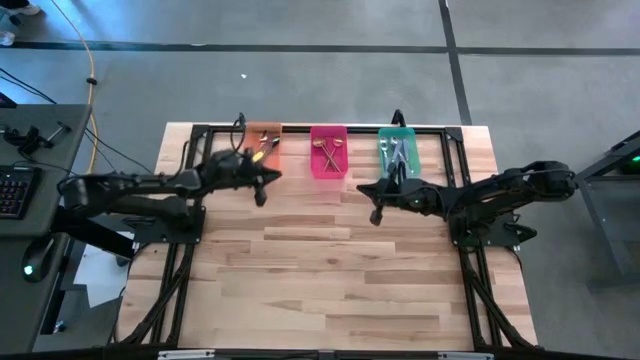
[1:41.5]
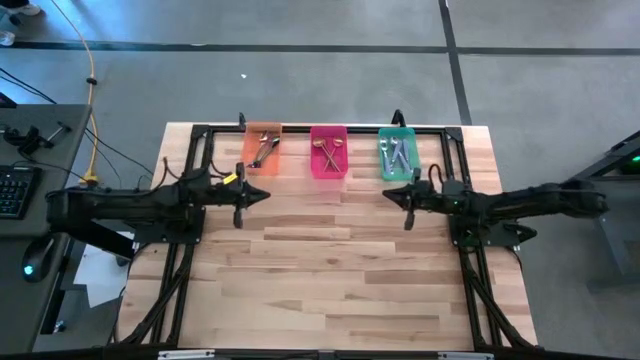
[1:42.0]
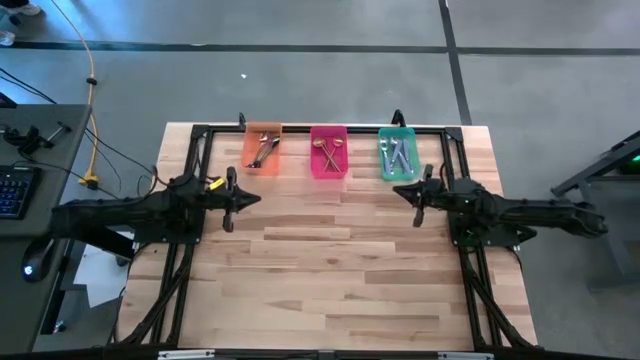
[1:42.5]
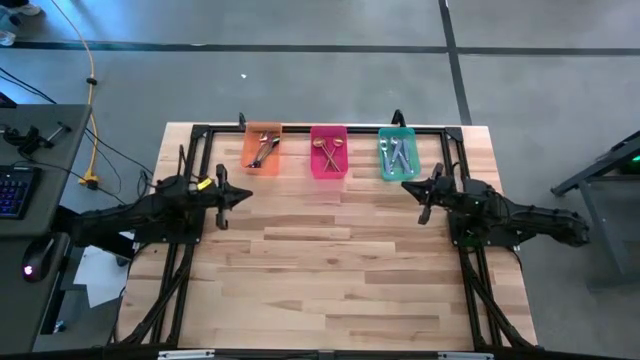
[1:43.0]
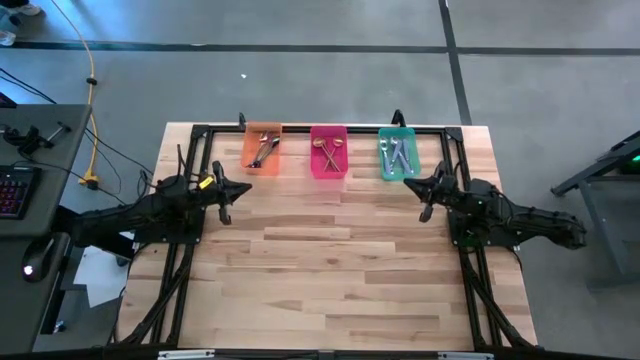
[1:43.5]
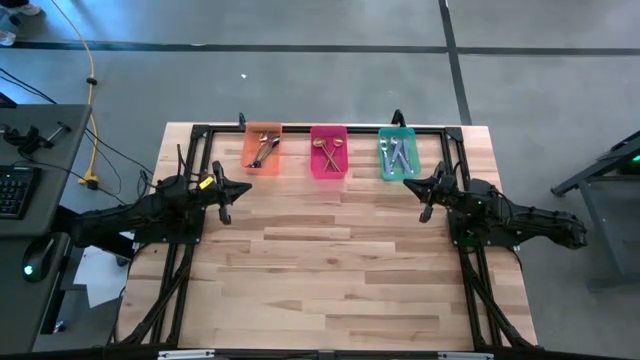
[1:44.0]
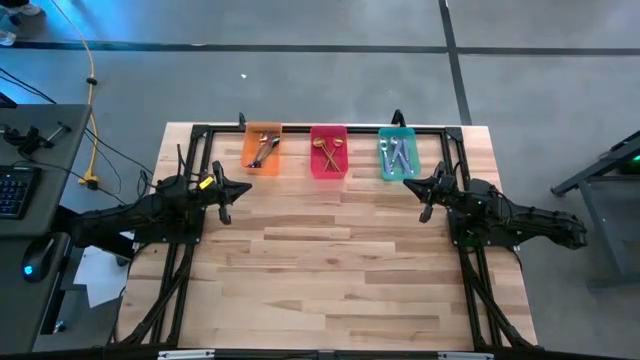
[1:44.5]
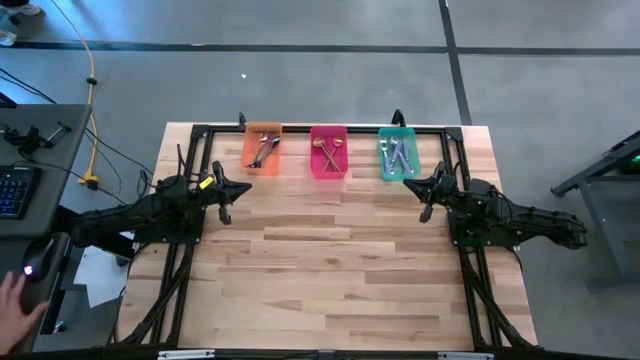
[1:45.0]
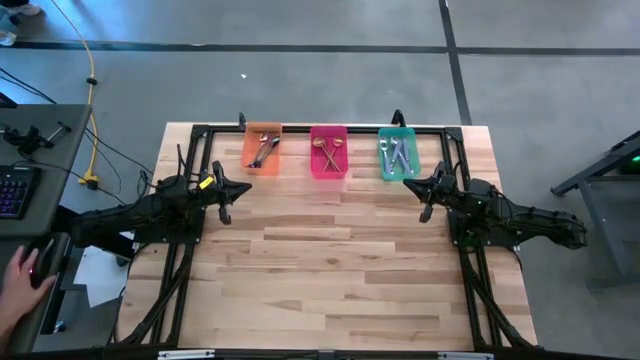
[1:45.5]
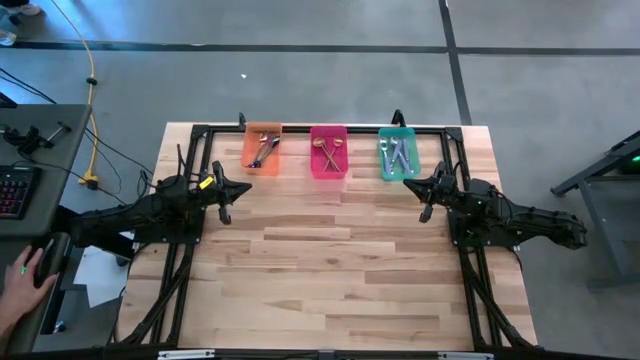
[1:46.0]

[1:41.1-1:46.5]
Task: Sort silverware by color (type)
Return to Home Position

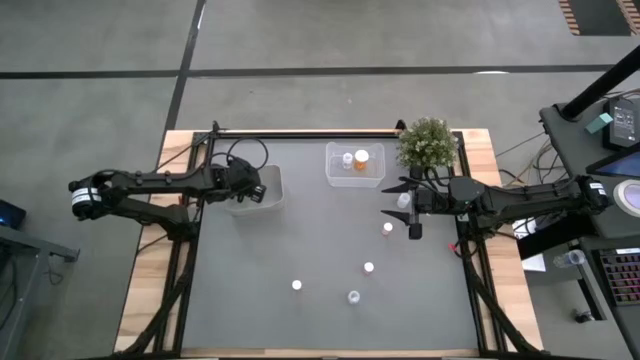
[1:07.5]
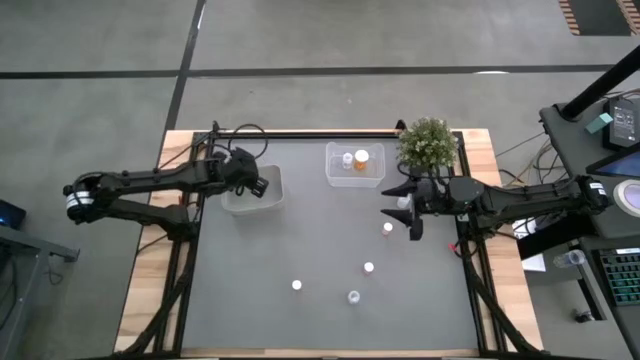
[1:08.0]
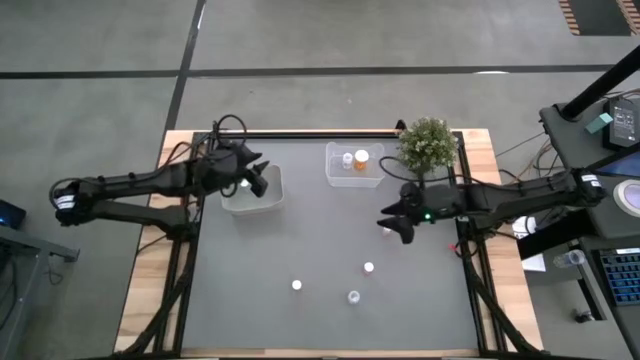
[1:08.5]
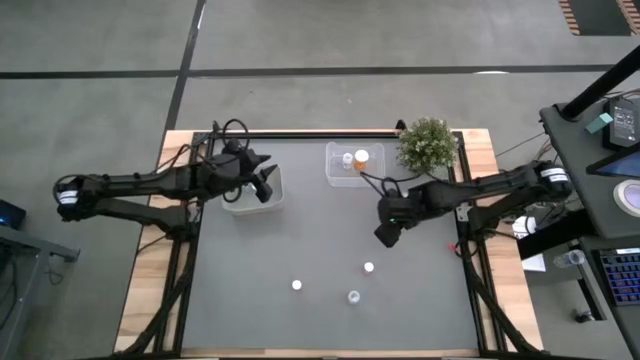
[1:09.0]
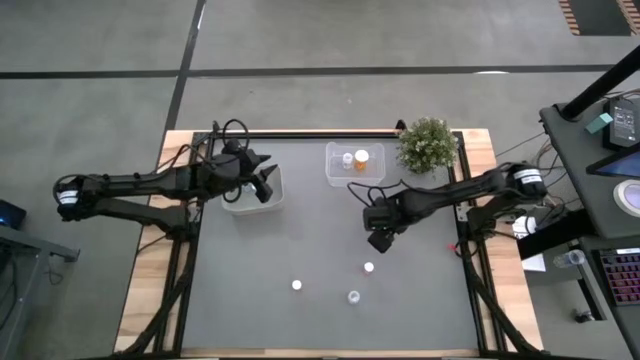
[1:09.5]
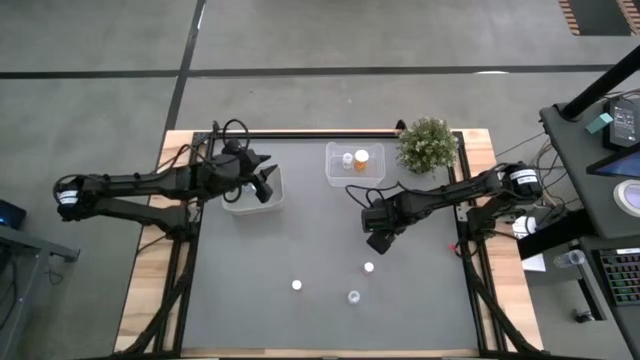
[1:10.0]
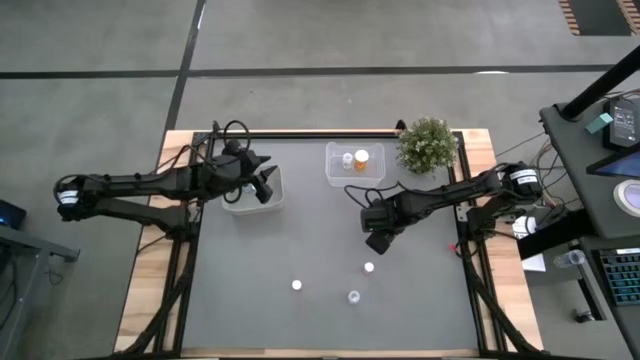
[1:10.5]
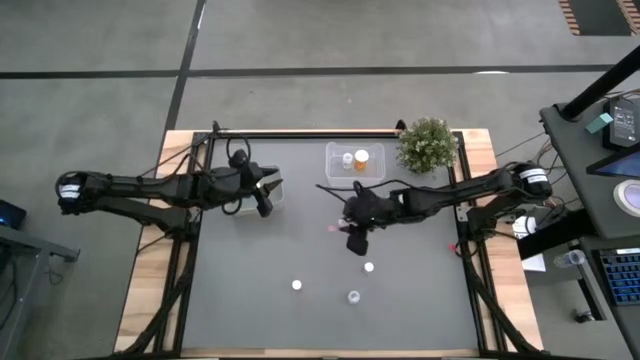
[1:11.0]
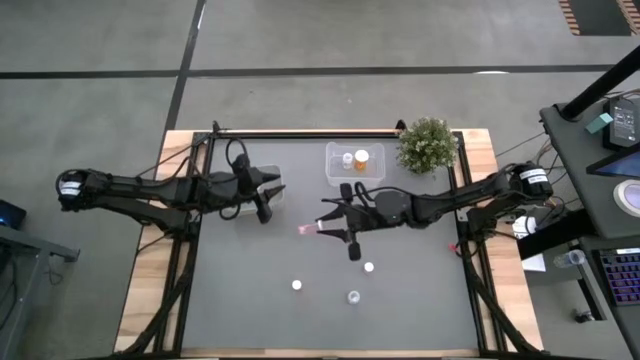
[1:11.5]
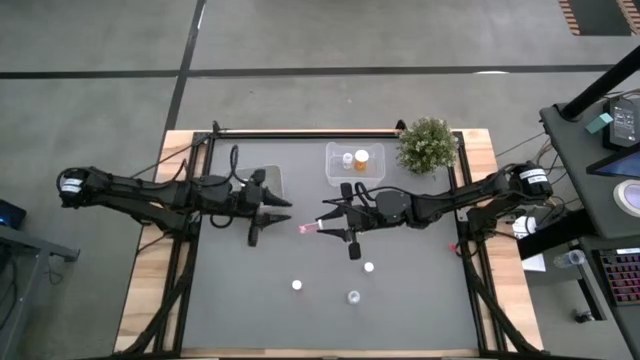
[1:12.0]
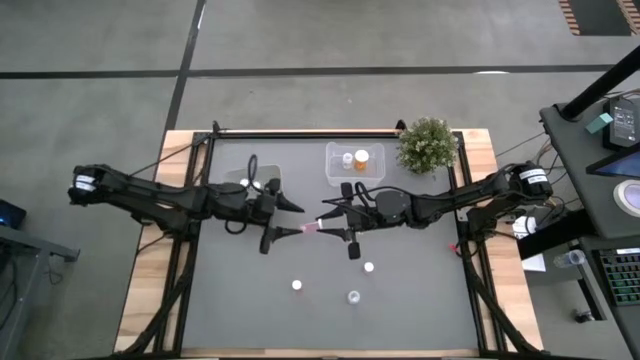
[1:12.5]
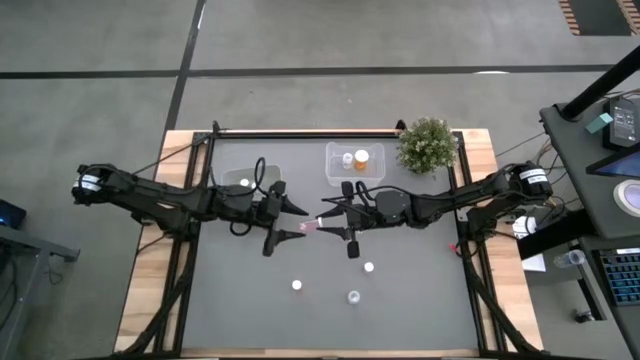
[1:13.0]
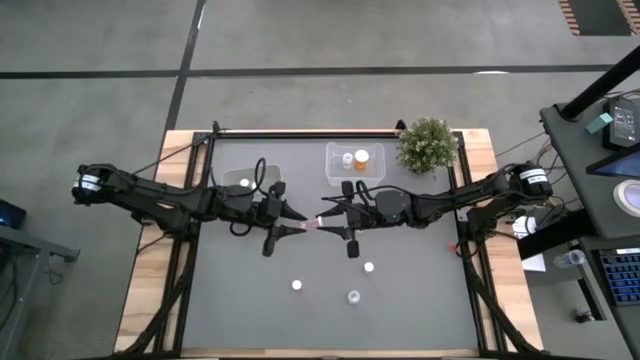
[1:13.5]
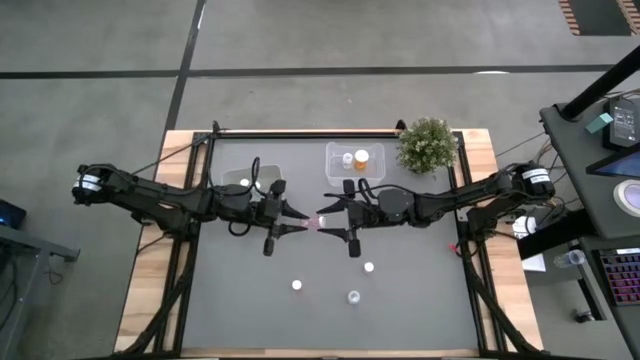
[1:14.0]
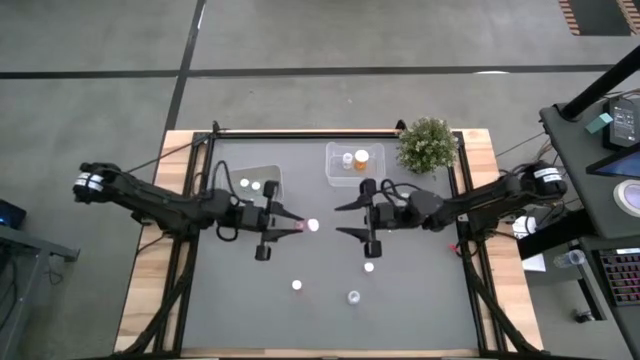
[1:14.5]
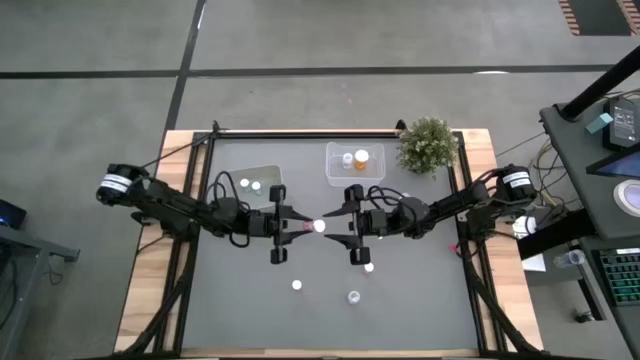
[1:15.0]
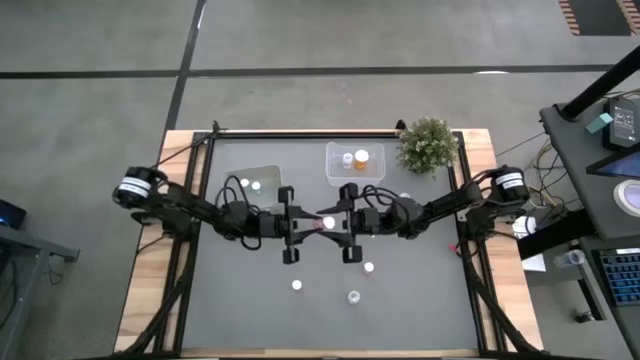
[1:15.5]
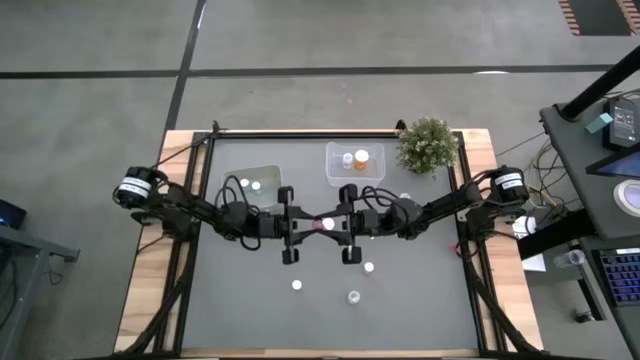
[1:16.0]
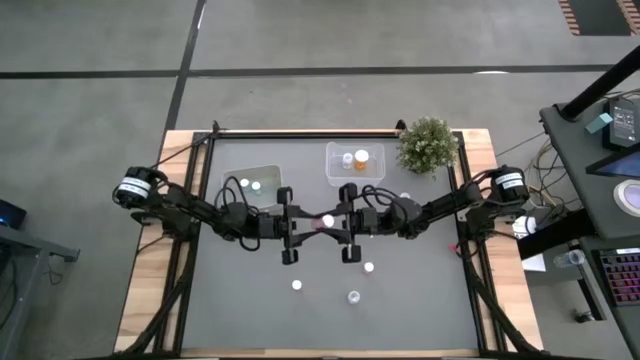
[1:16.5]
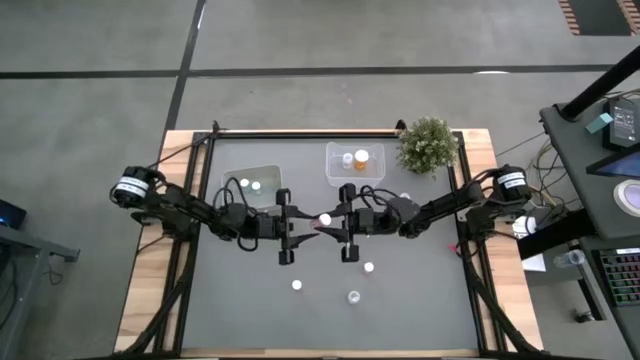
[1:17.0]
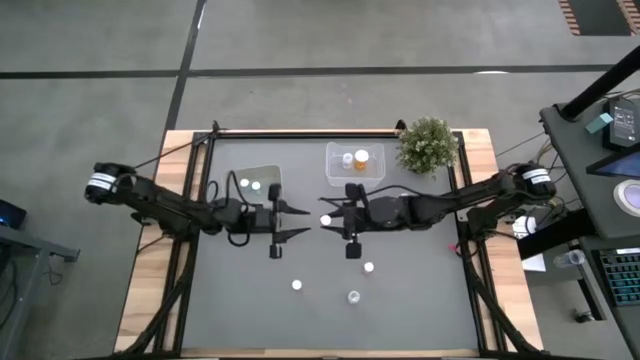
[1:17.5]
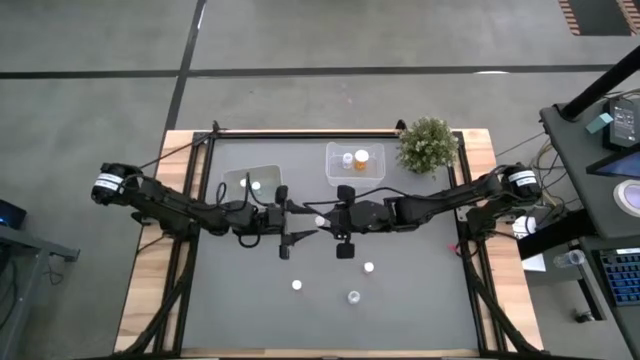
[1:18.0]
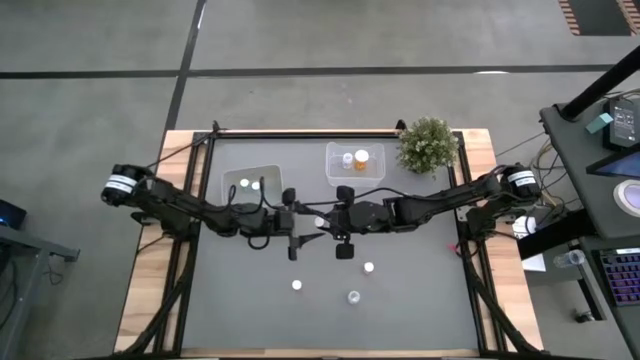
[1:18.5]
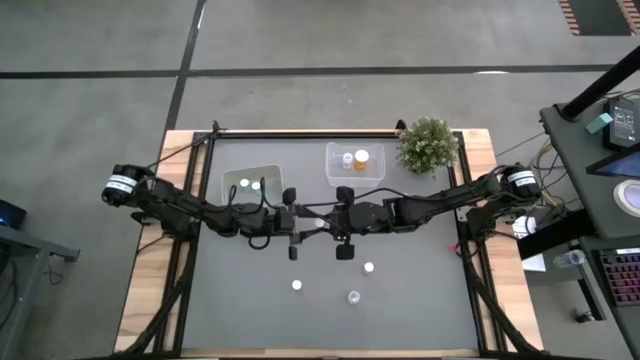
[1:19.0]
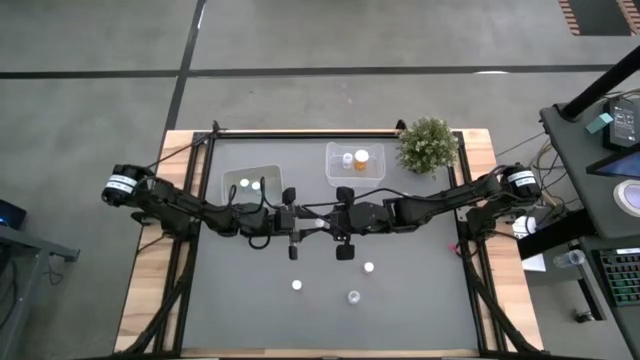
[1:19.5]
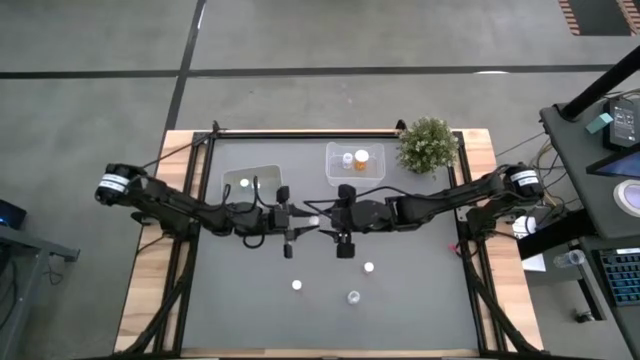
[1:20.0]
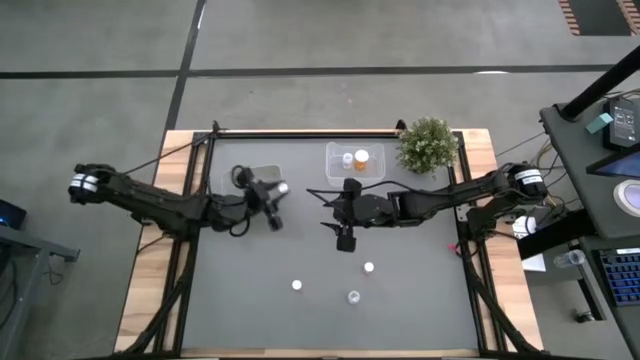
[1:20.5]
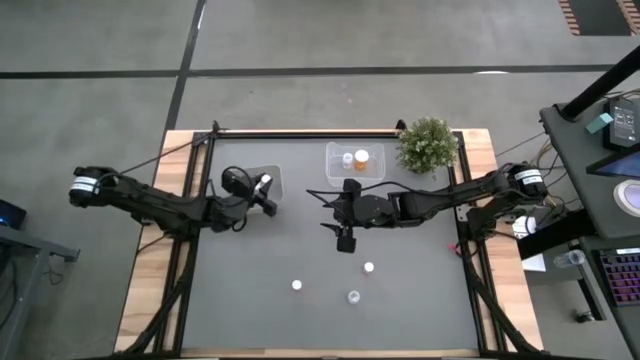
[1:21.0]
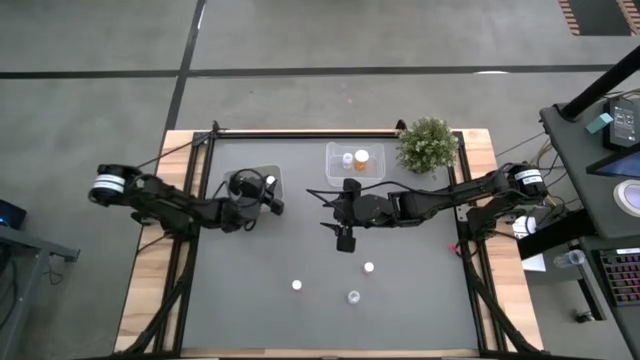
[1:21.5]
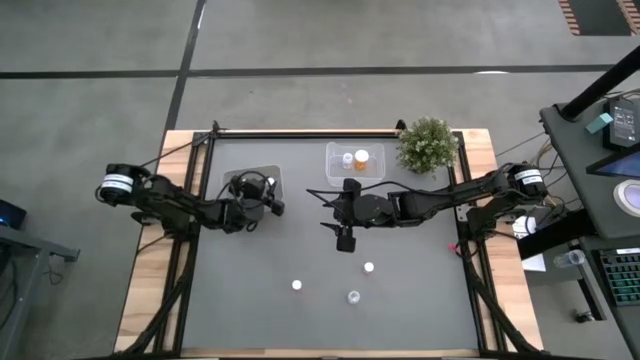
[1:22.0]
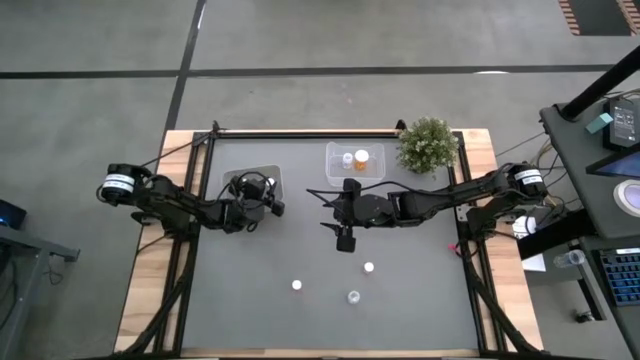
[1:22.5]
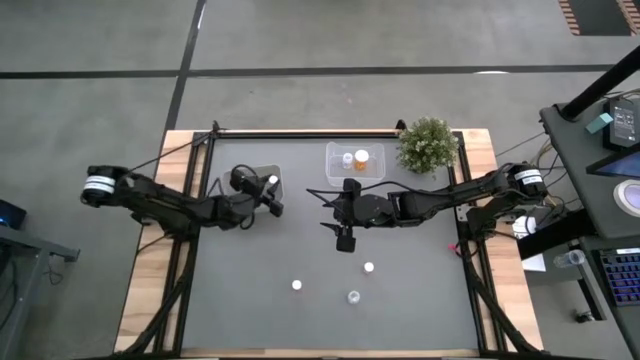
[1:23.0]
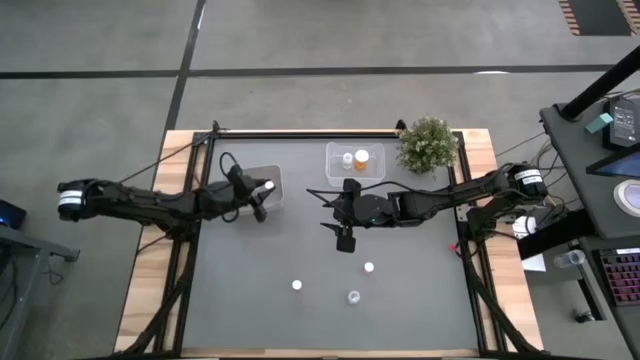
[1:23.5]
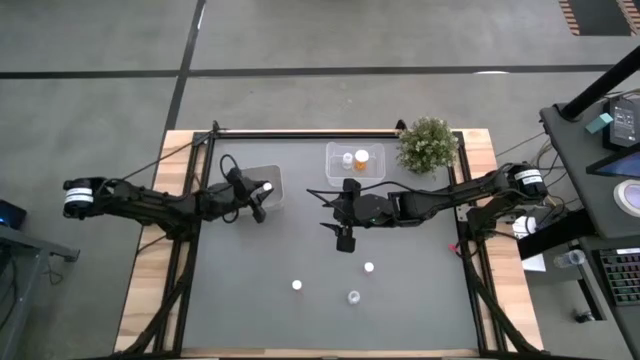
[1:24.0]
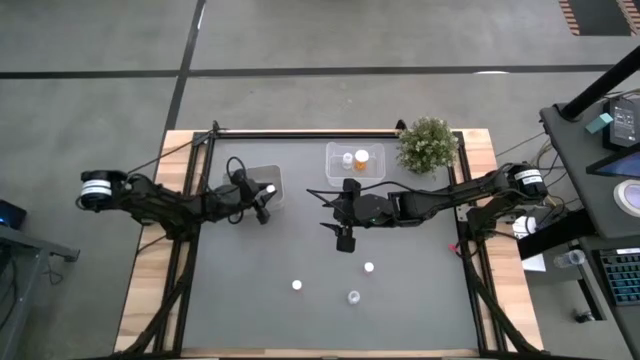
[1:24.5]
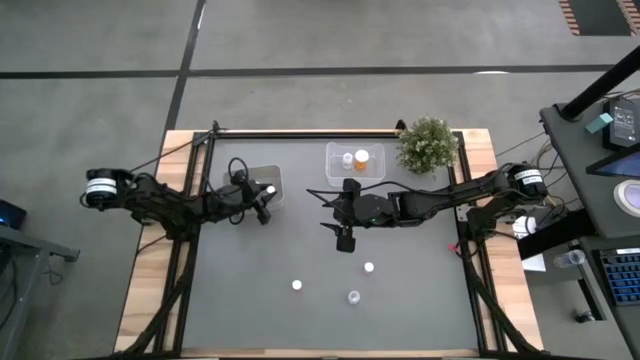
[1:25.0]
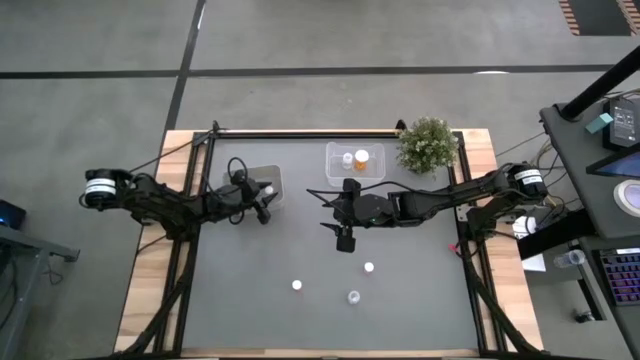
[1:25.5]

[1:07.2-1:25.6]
Task: Pick and place medicine bottles into bin by pill shape (circle, oval)
Put the top small pink pill bottle into the gray bin
